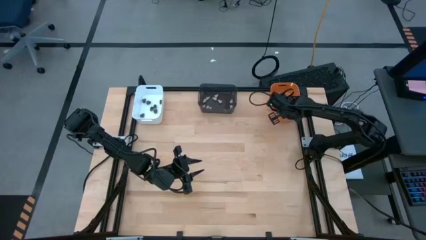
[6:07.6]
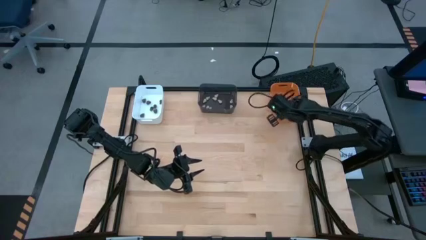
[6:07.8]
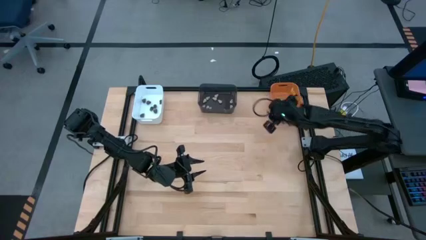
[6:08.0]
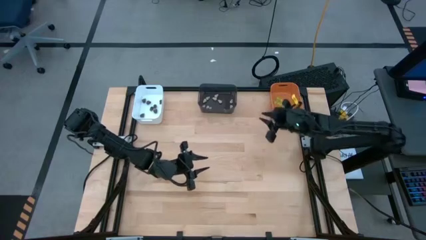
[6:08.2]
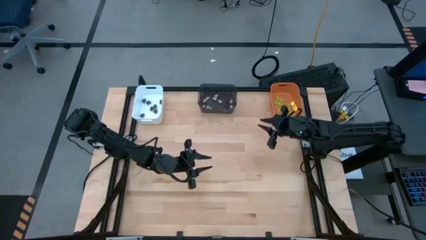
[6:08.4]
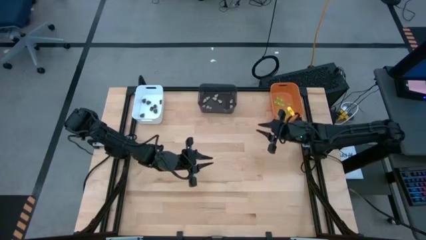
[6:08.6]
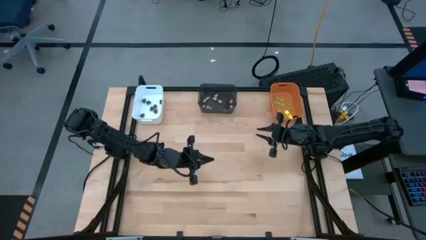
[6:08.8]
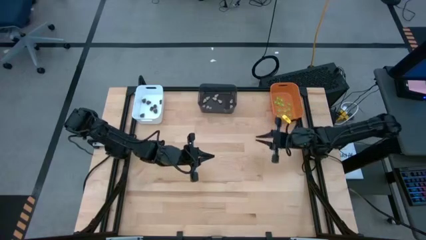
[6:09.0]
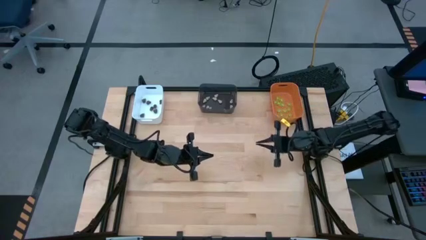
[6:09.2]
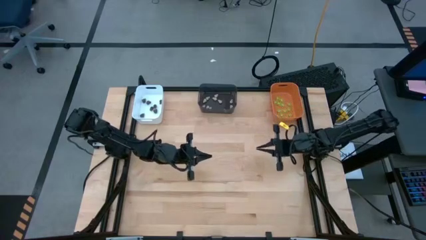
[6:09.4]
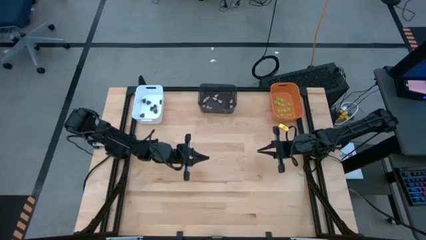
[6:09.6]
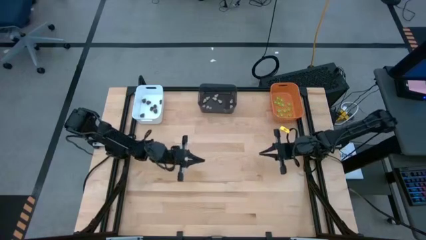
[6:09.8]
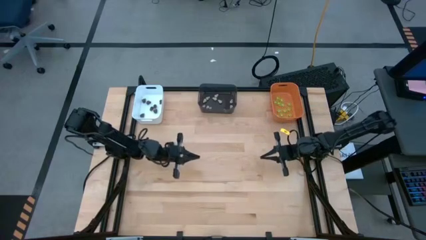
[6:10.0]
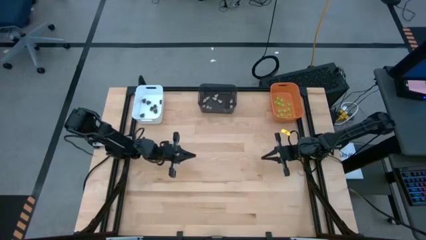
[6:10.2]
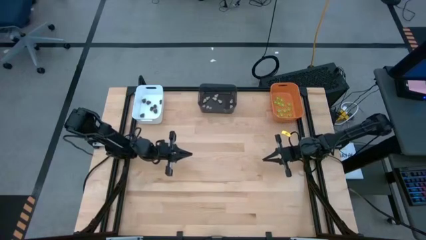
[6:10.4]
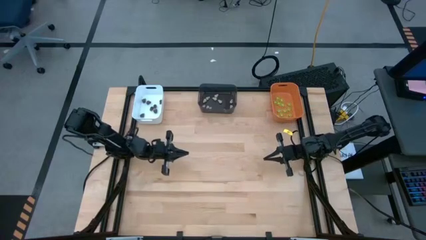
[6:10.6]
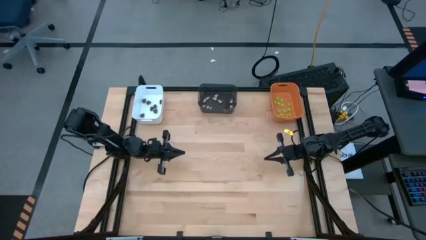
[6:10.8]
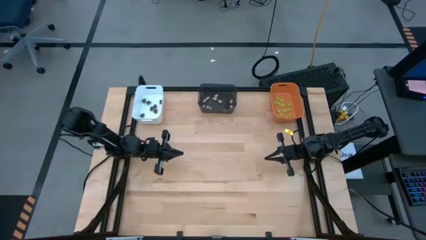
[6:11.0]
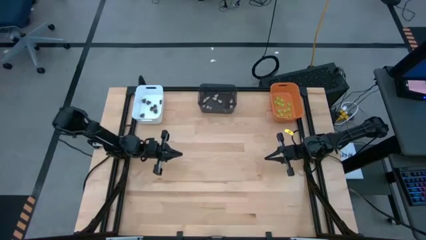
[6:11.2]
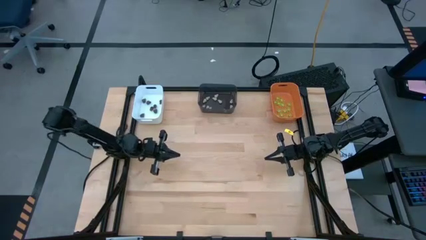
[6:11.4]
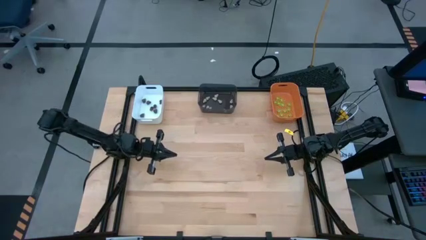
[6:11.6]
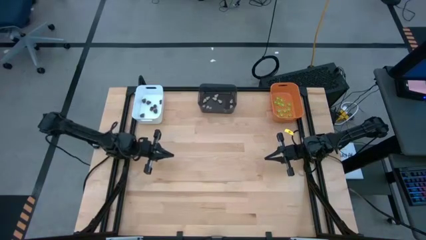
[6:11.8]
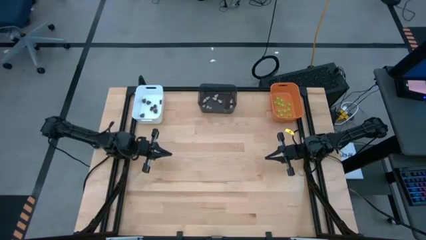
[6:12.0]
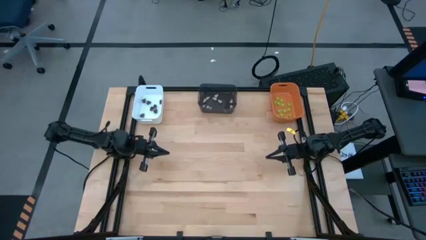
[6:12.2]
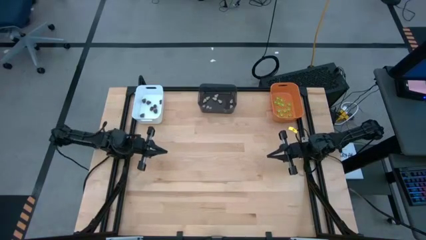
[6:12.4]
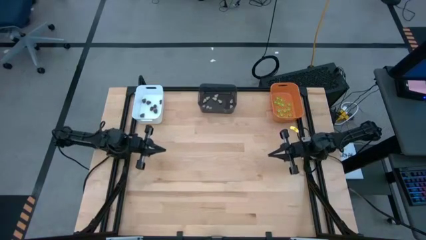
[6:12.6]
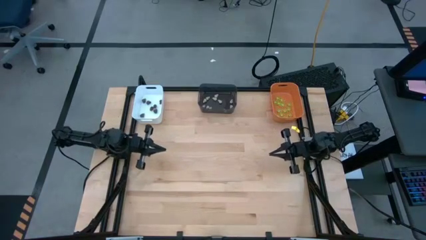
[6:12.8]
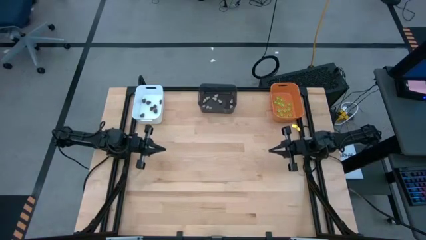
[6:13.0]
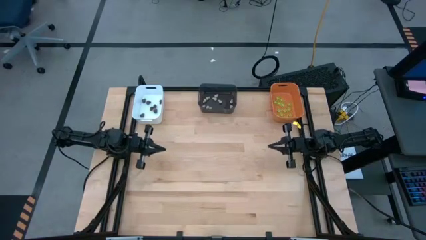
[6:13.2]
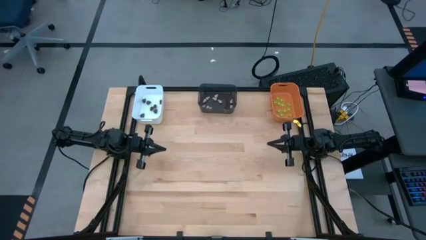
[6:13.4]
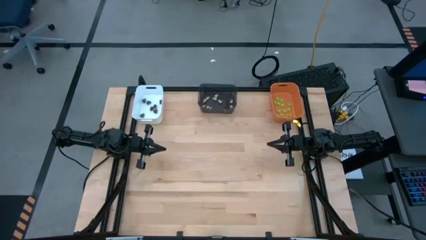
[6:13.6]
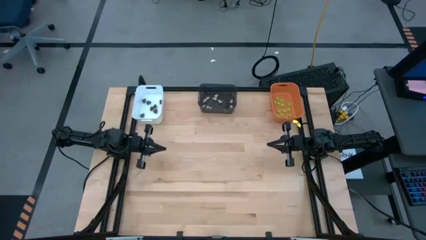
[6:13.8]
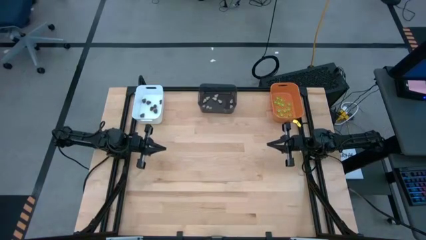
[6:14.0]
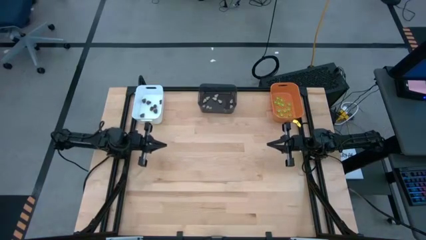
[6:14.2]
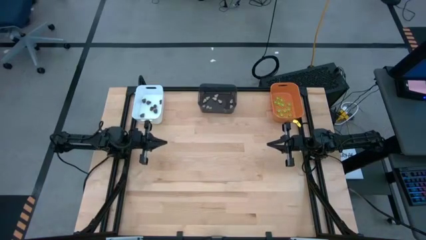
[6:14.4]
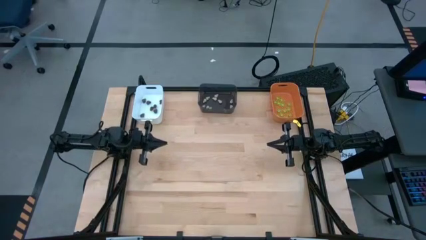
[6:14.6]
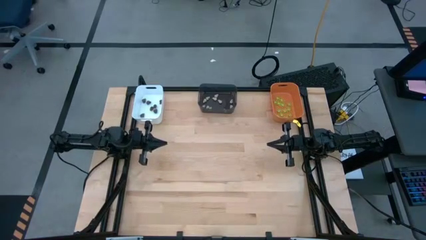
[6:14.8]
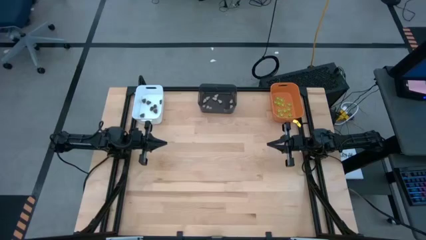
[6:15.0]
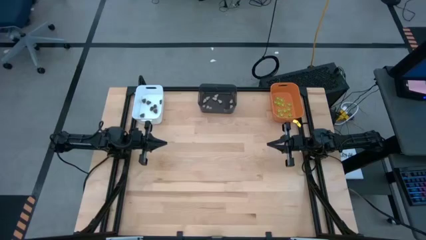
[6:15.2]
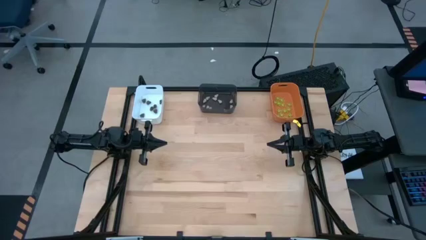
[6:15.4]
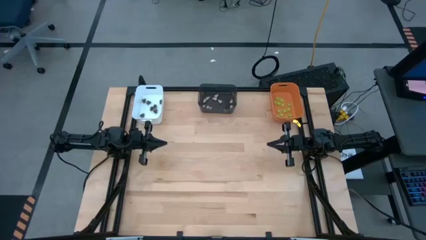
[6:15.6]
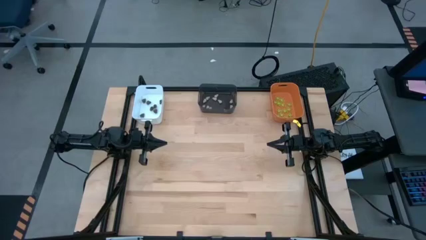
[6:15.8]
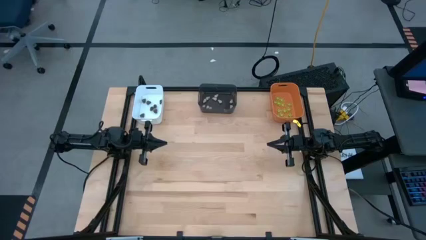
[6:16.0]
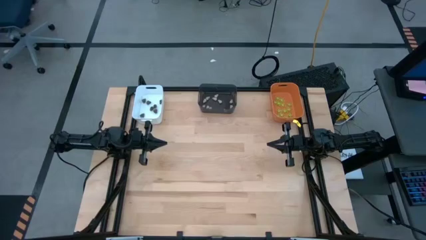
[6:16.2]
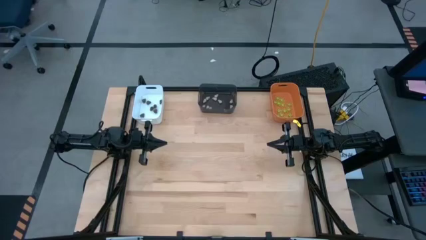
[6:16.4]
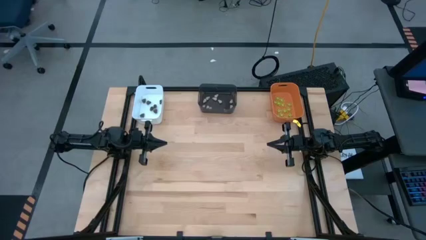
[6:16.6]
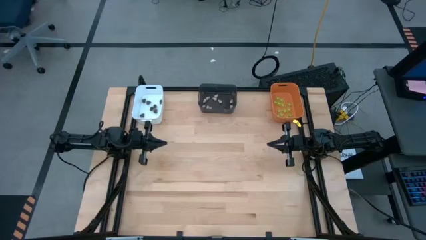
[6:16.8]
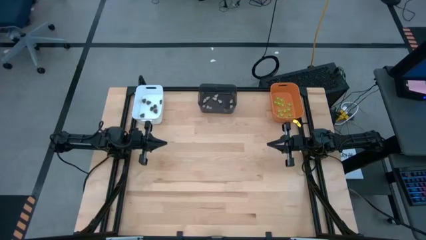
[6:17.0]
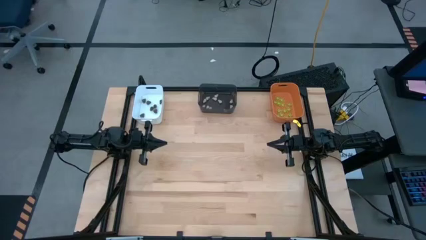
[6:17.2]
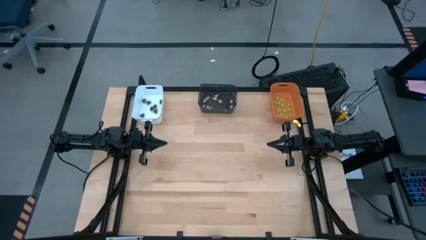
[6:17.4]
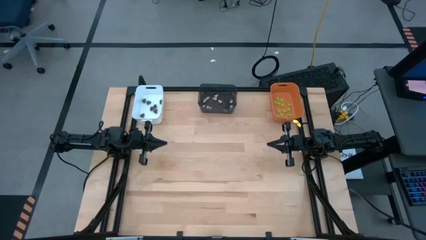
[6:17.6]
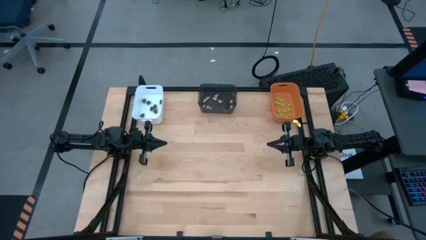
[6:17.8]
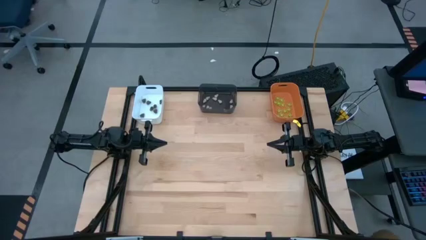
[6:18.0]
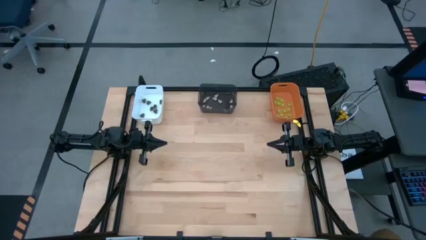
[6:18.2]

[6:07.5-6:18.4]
Task: Sort Halloween decoration
Return to Home Position

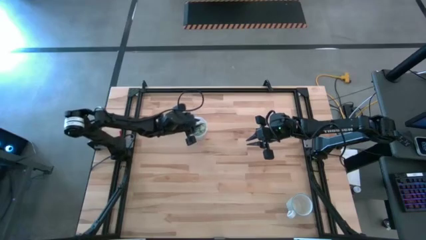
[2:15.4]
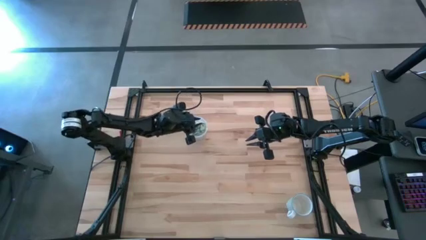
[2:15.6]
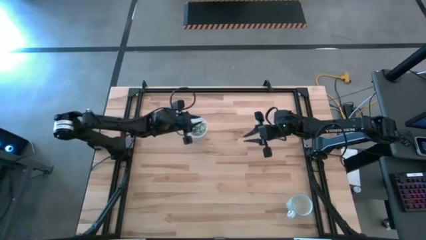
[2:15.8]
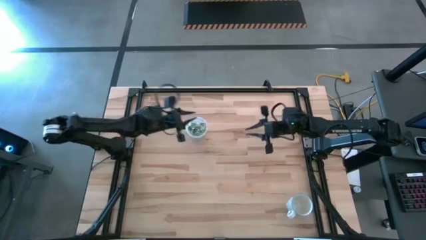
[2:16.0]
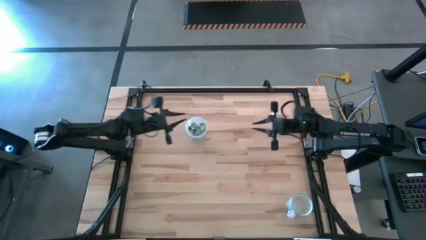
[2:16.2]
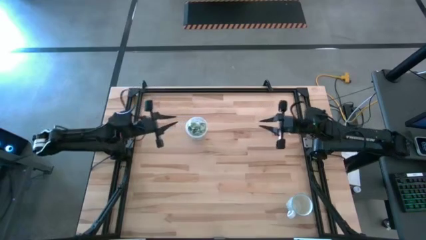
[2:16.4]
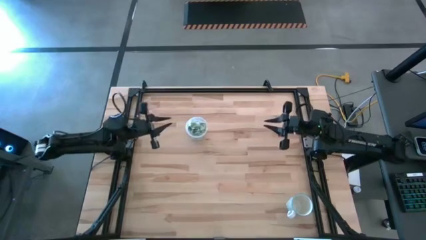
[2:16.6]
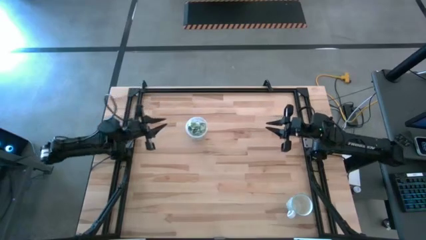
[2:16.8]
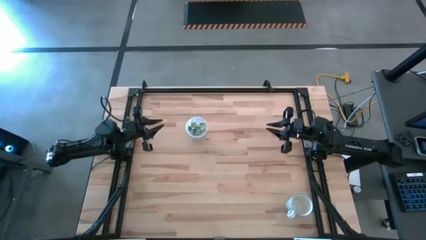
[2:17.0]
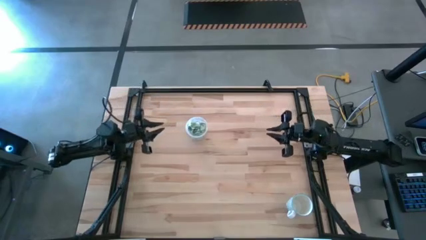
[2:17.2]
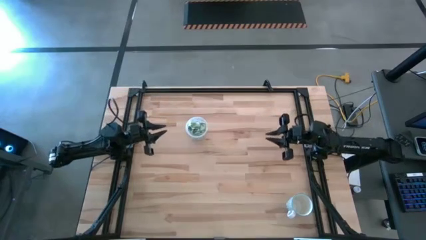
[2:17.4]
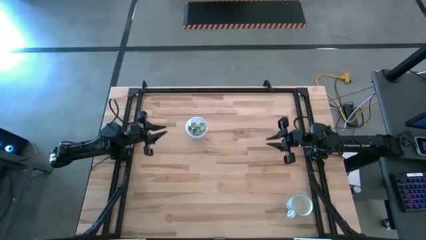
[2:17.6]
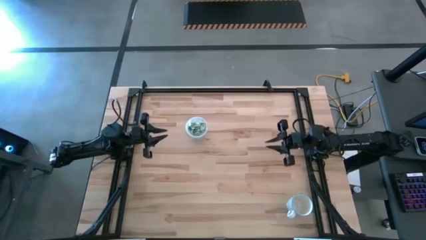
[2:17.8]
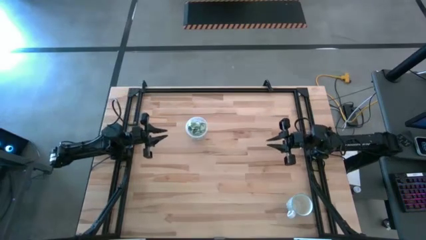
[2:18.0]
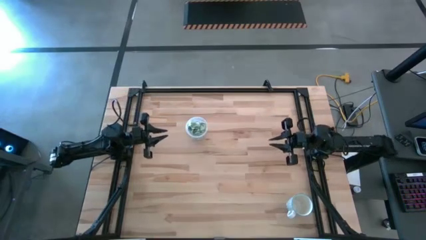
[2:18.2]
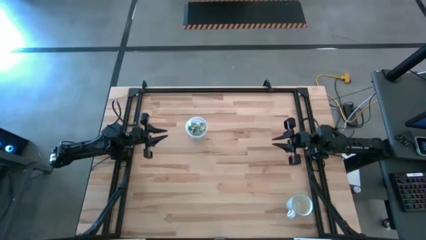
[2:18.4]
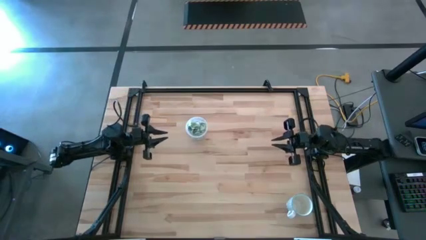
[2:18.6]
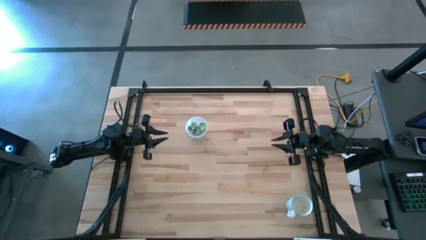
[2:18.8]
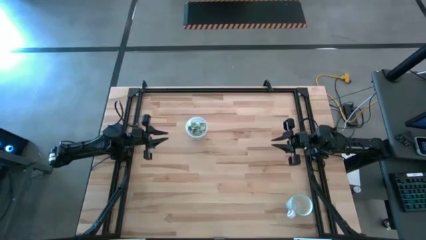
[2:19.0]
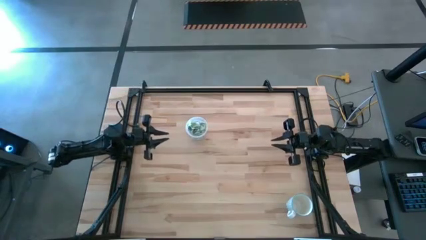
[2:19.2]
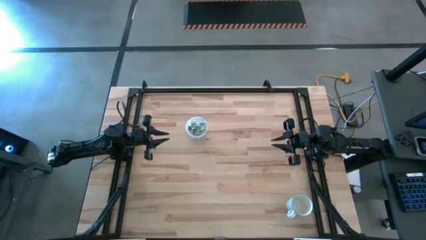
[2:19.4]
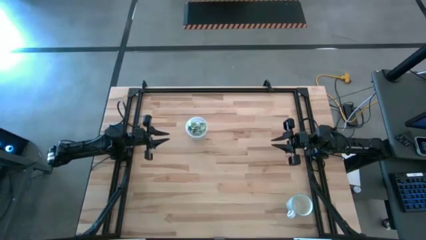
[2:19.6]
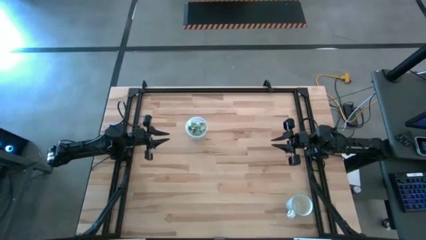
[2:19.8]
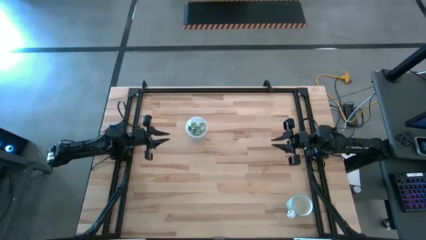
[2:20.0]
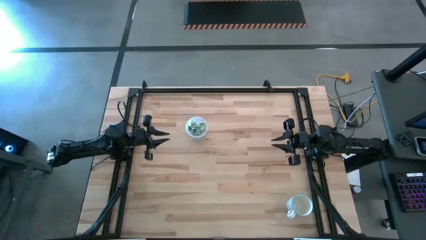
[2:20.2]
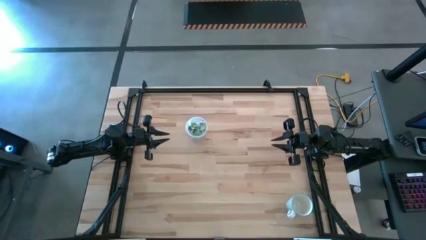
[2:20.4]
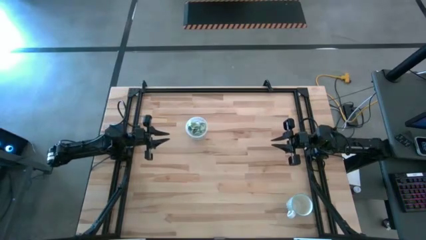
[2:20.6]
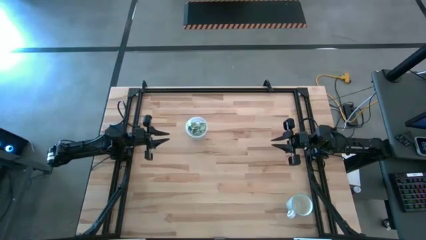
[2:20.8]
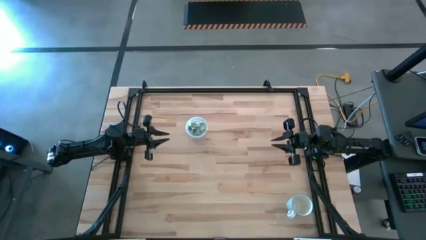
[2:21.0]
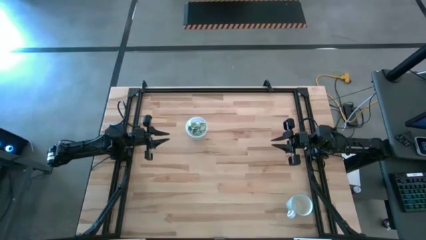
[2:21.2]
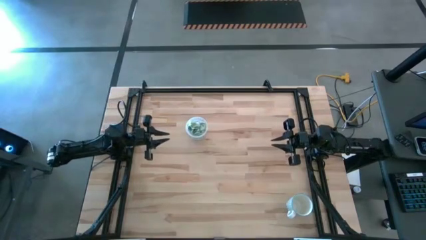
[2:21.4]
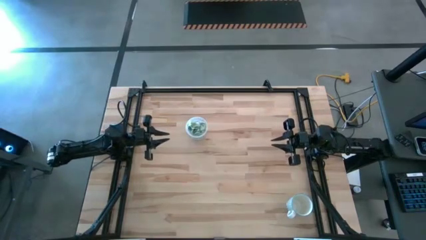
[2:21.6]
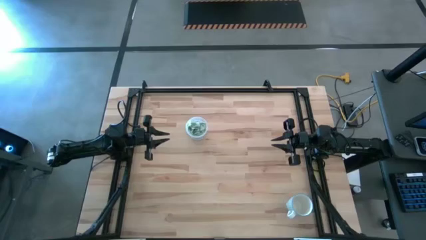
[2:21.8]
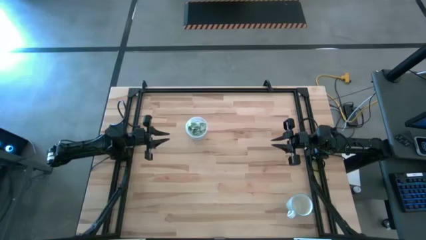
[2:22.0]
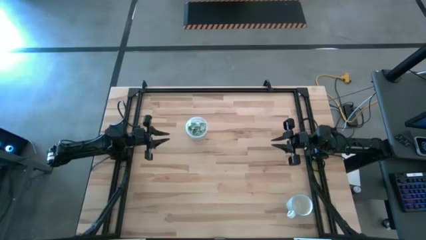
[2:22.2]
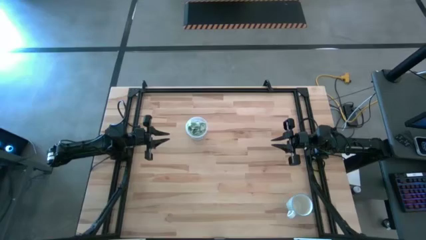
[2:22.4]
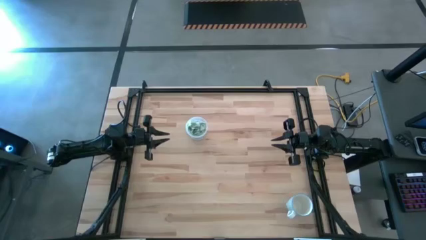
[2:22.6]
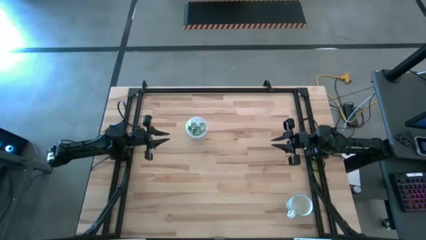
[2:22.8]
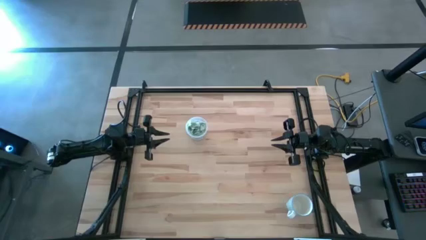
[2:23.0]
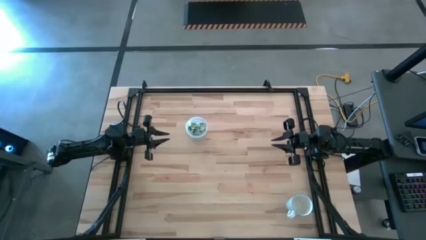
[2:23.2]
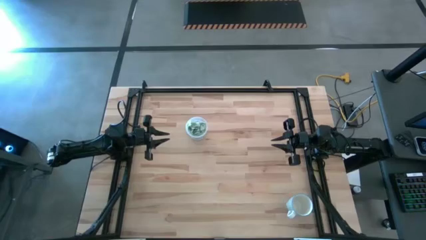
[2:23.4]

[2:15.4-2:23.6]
Task: Pick and place Stevia / Truvia into bins
Return to Home Position
